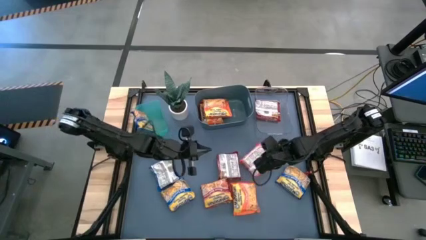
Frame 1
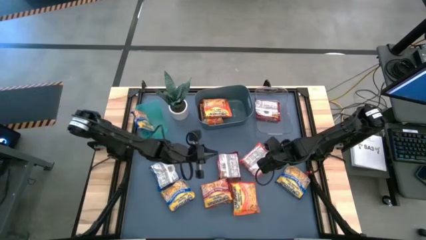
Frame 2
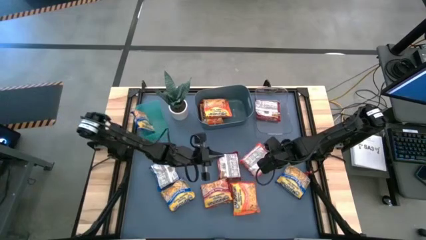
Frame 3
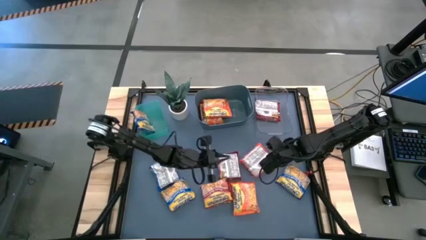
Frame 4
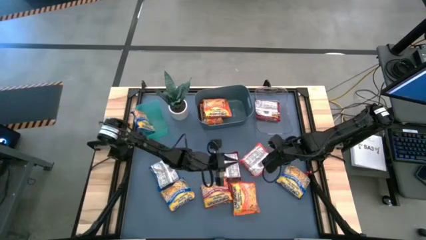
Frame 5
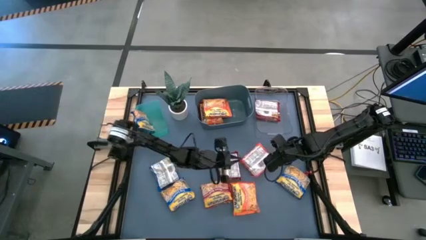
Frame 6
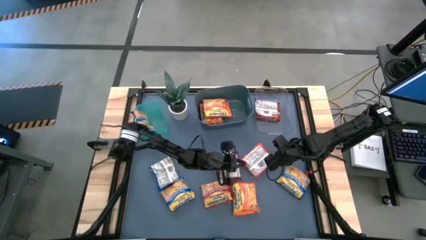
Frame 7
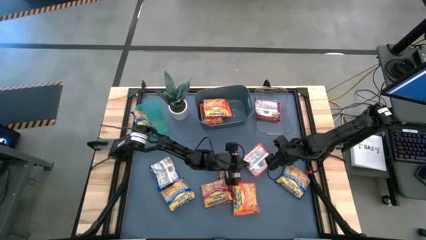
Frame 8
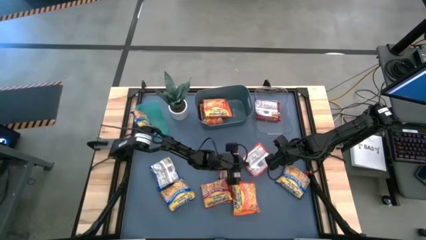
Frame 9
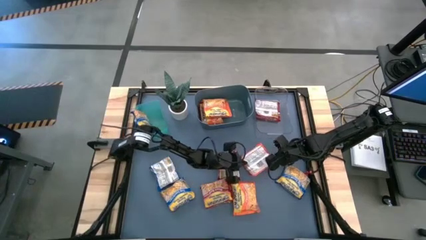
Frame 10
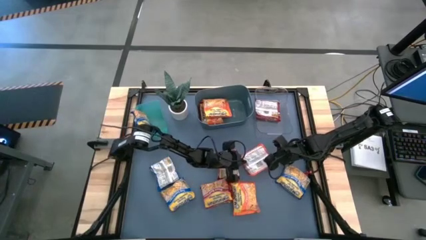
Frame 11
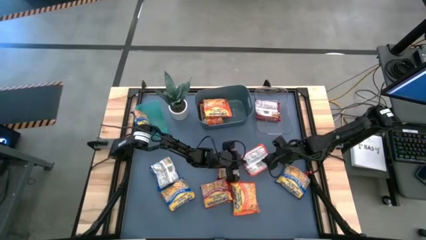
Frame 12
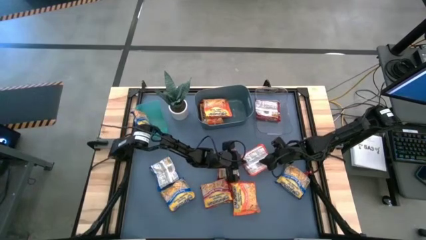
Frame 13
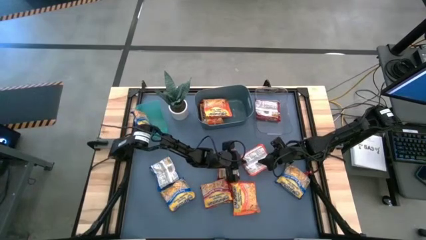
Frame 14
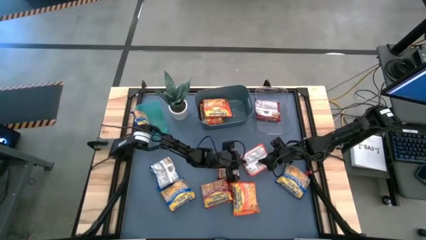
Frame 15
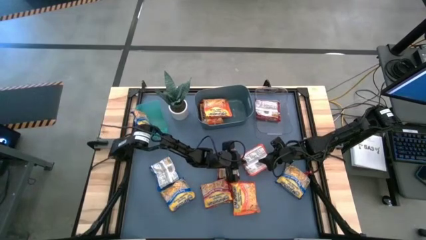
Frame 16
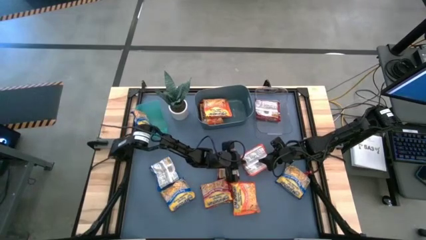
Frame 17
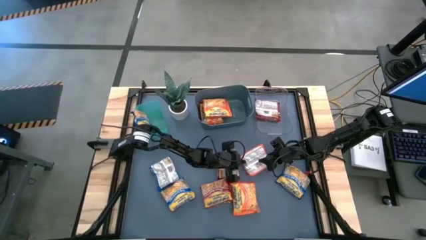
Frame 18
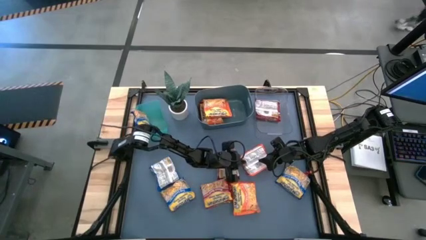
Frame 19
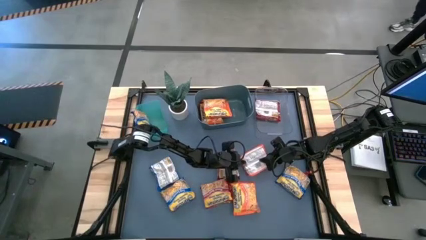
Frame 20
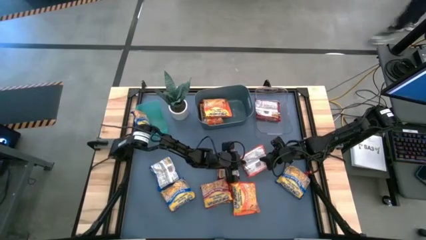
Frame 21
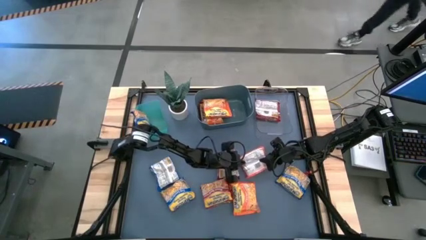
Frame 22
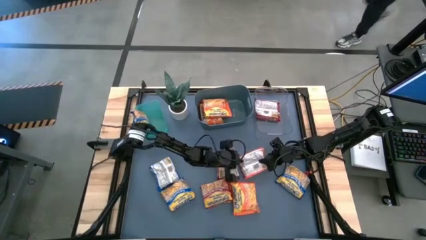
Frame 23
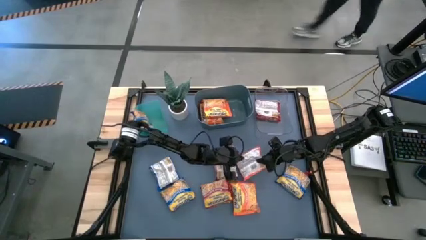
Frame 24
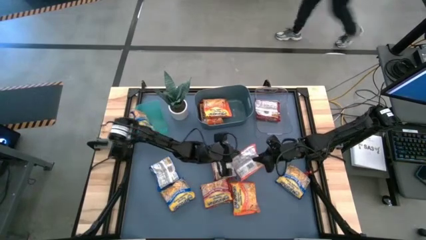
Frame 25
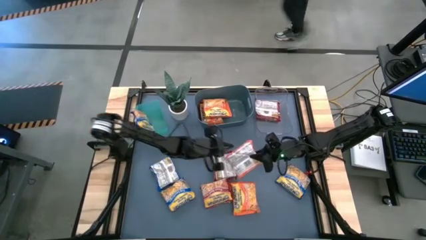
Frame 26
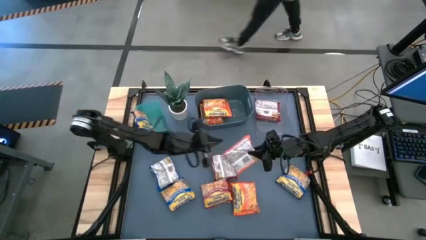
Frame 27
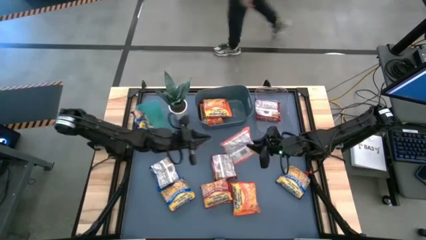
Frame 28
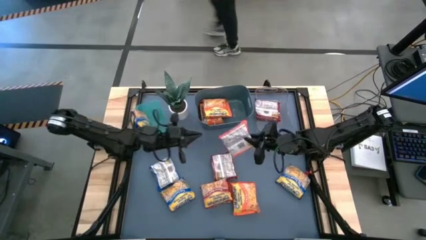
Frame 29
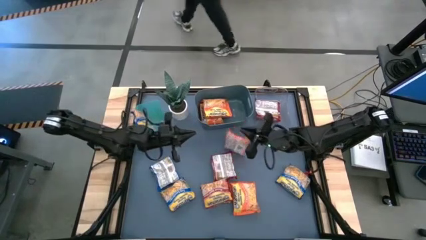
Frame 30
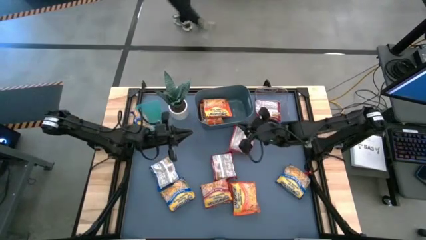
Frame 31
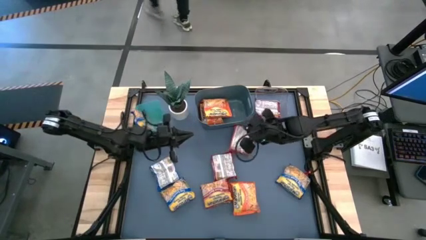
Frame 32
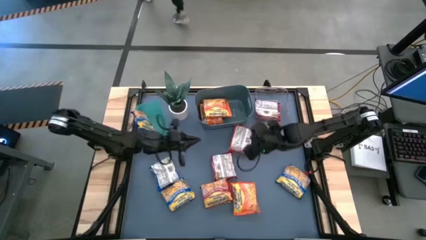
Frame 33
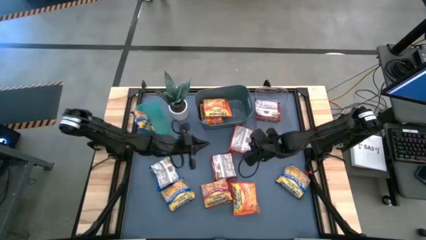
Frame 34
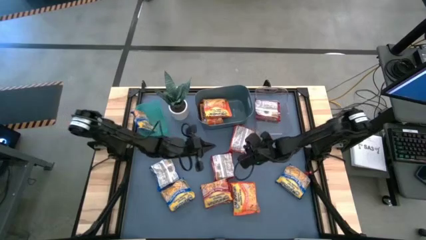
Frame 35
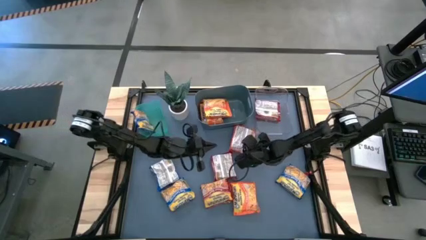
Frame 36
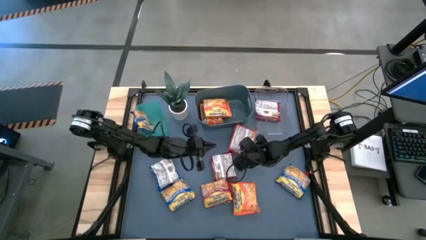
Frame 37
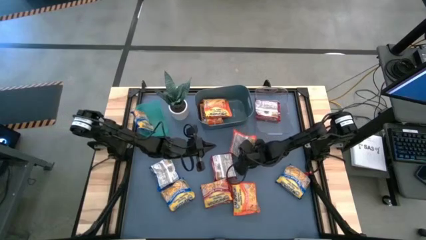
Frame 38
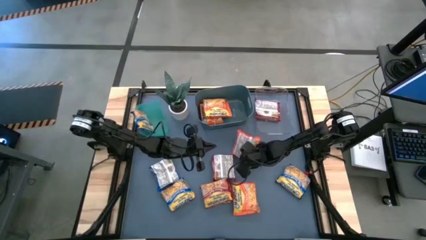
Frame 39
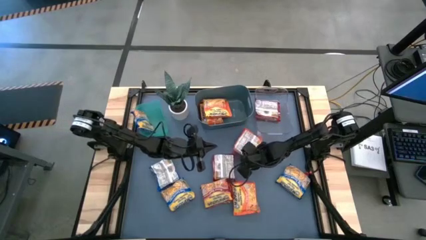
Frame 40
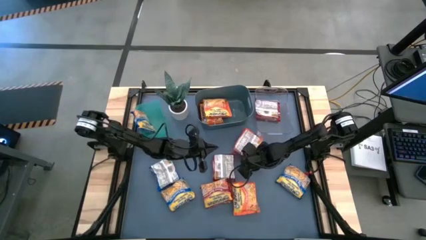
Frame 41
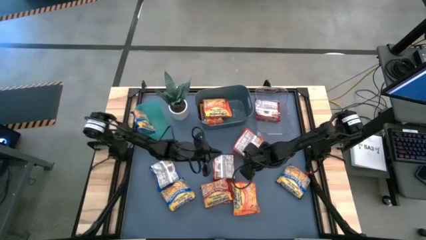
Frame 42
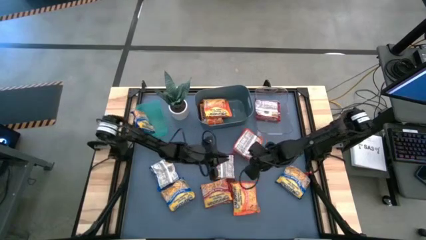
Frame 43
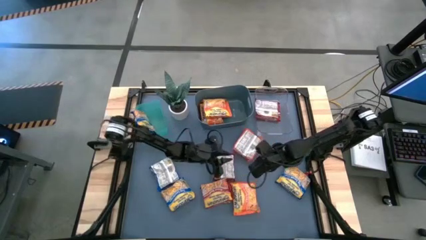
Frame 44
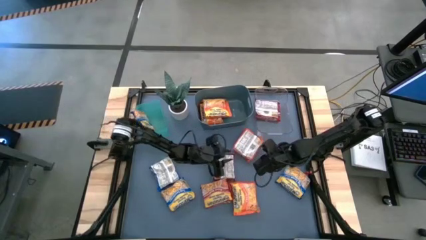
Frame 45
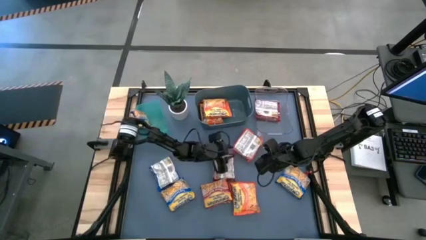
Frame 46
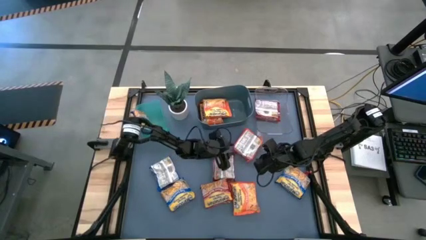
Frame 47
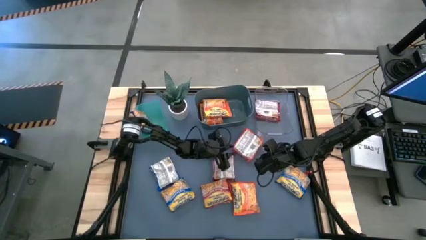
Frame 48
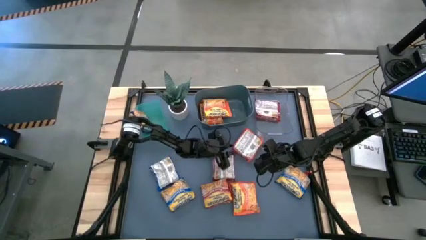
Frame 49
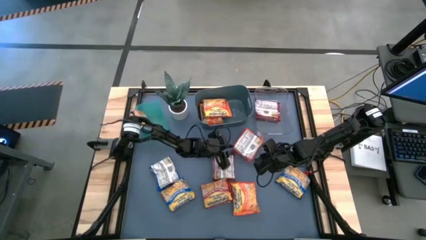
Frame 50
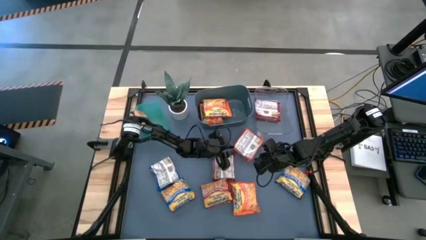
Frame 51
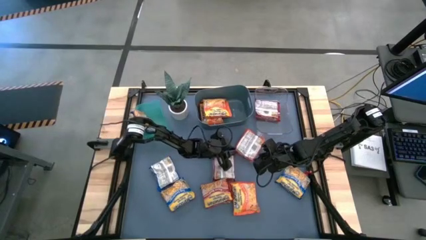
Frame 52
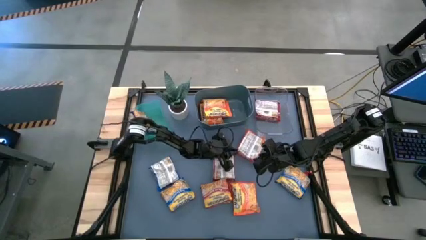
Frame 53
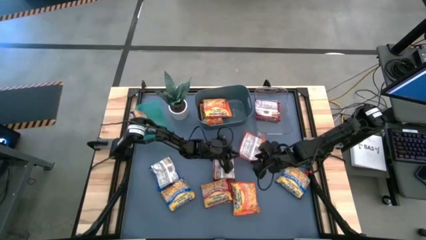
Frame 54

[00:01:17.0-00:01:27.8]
Task: Sort Maruchan noodles
Put the orange noodle pack into the blue bin

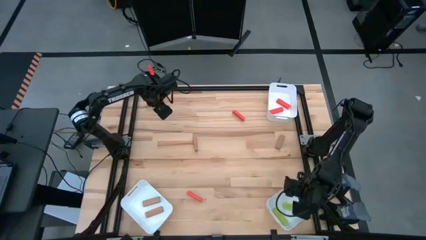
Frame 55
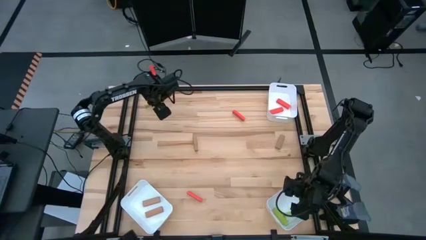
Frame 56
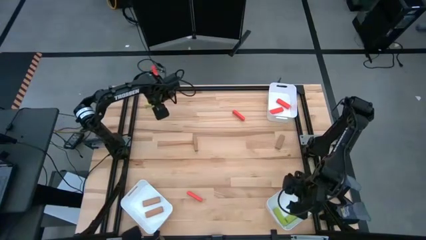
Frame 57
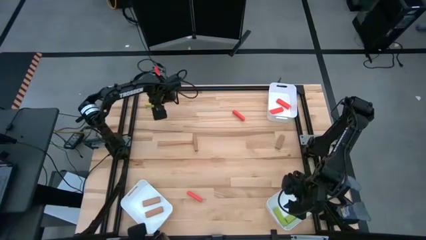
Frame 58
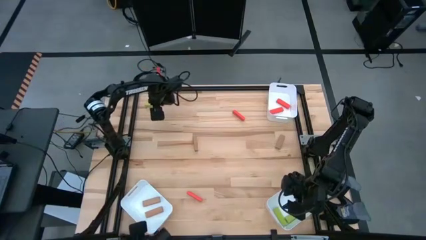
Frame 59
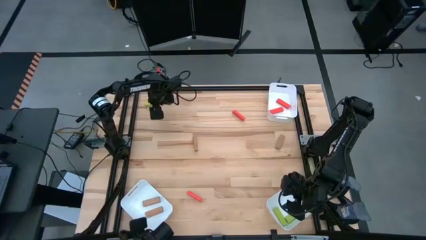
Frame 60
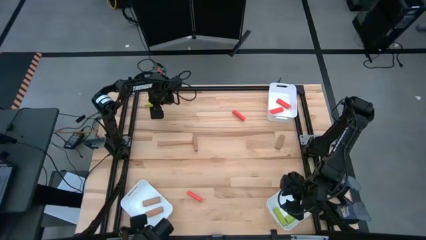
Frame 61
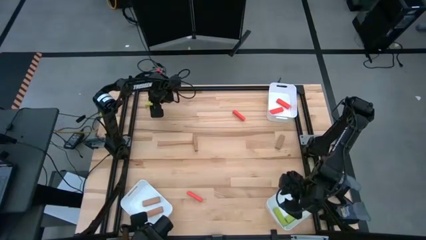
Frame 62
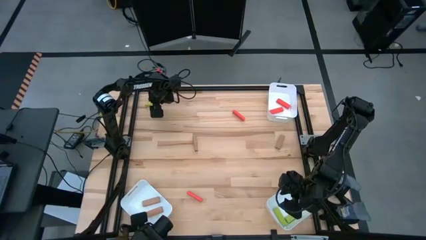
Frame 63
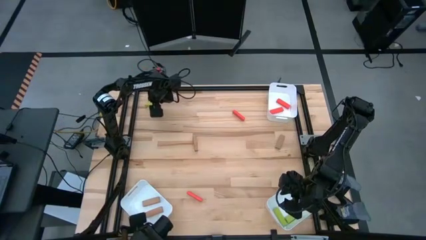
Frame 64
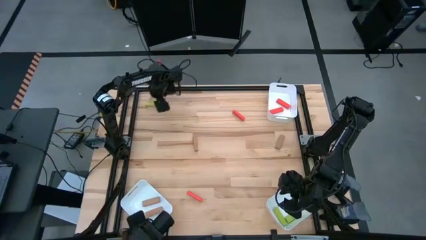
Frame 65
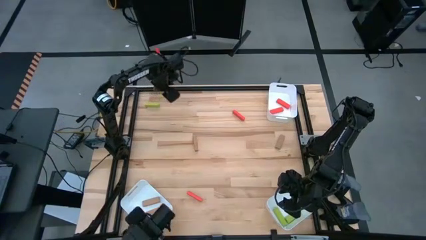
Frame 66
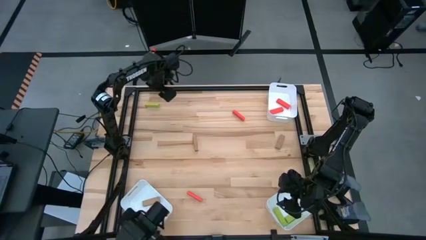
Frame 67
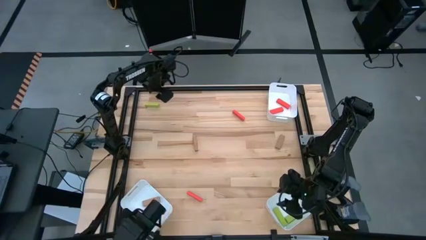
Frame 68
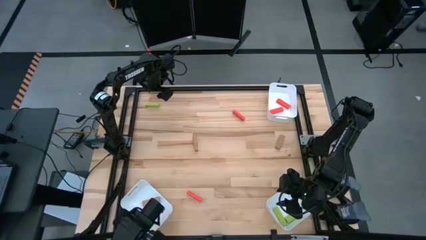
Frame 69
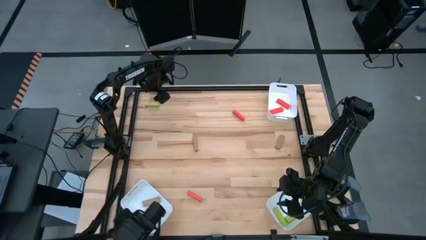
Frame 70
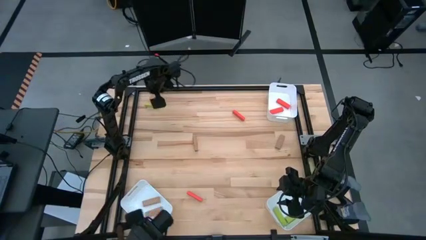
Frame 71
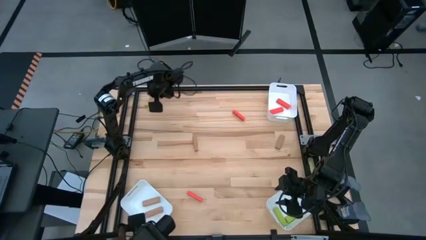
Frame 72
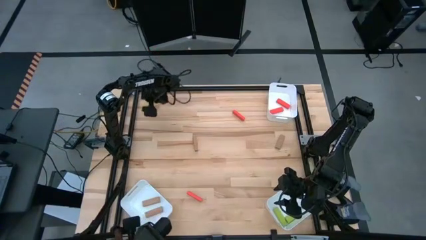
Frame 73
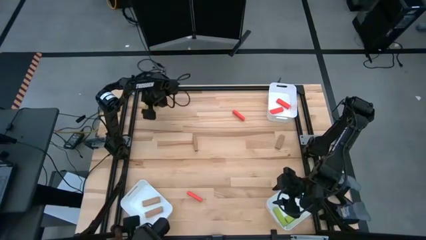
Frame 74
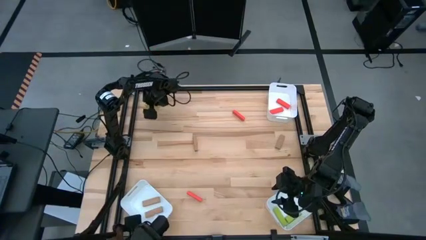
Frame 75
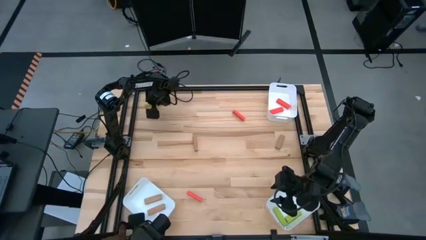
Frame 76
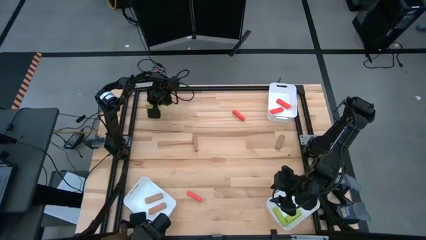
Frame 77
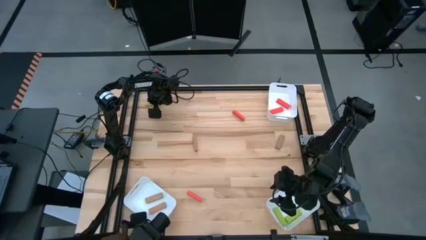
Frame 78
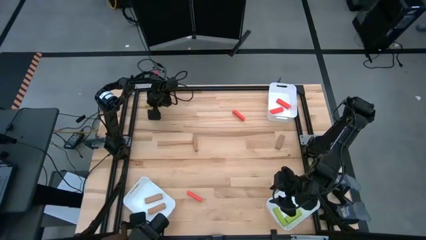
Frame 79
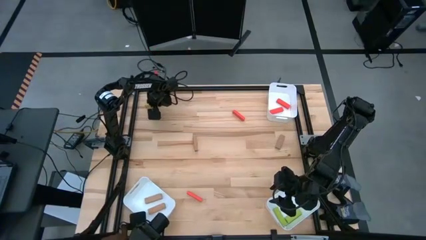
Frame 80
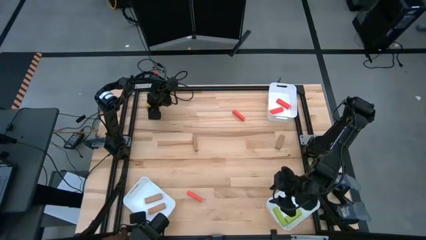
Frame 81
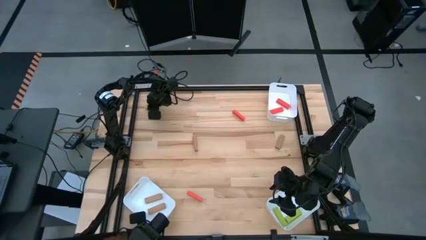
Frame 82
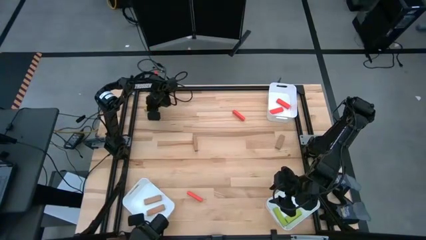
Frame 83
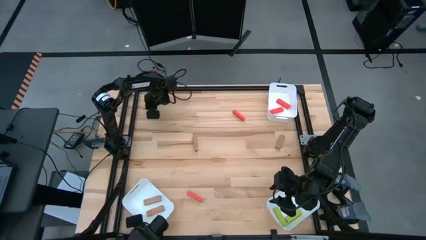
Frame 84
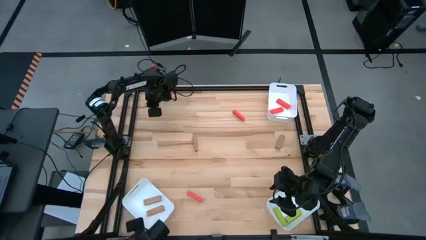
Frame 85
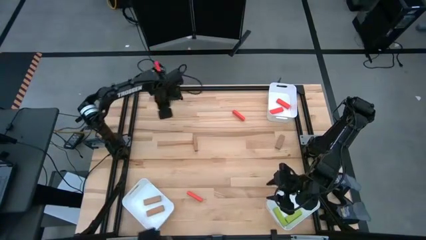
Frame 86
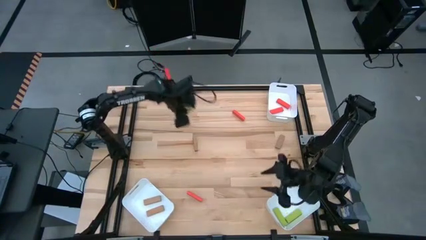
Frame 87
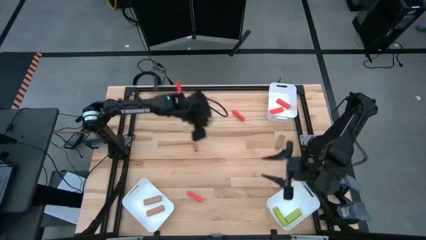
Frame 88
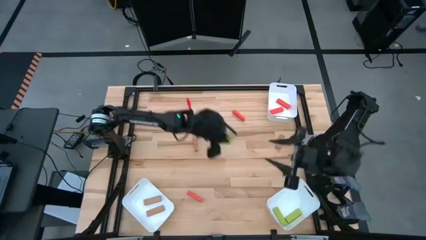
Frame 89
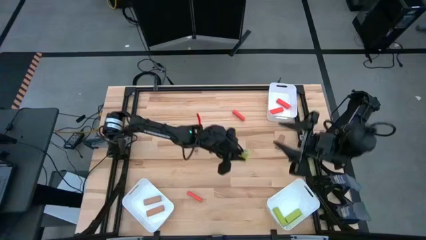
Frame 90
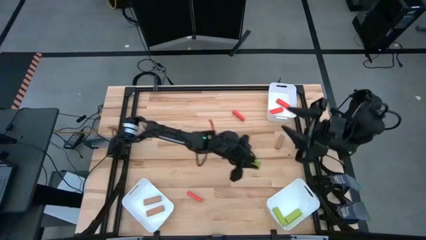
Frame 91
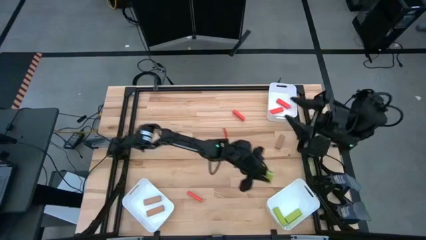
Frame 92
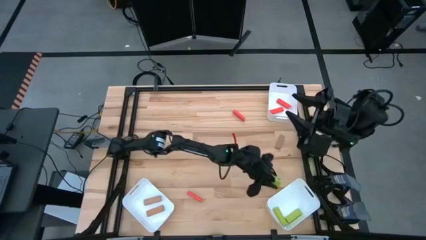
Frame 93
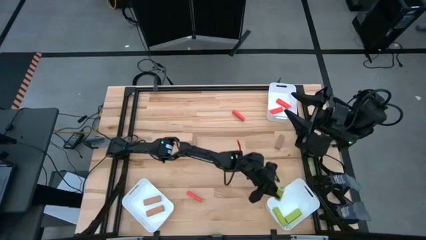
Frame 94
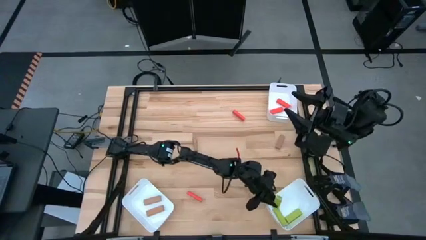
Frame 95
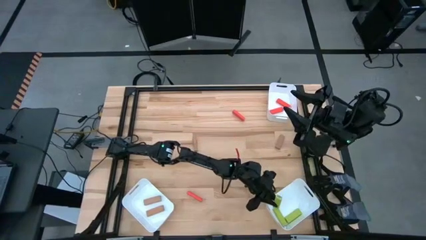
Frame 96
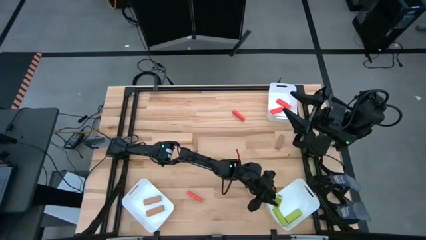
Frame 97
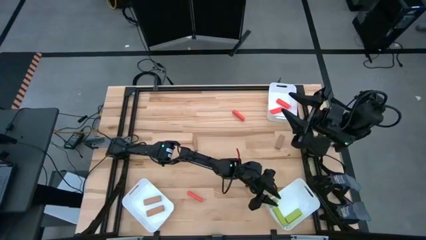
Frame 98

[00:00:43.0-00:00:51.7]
Task: Sort blocks
Put the green block into the bottom right bin
